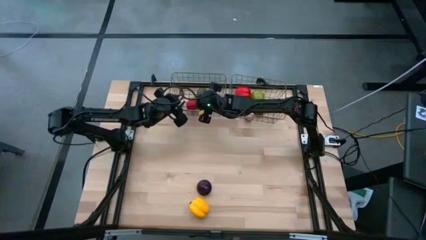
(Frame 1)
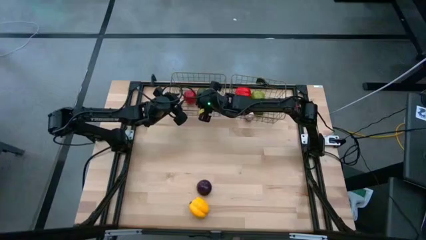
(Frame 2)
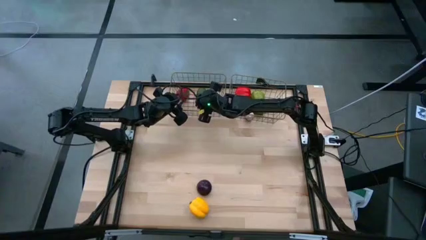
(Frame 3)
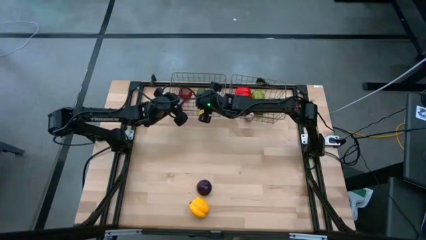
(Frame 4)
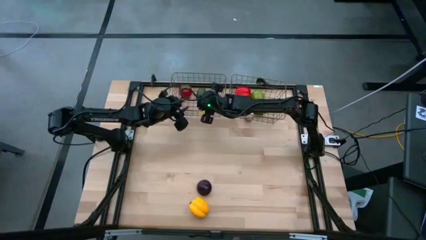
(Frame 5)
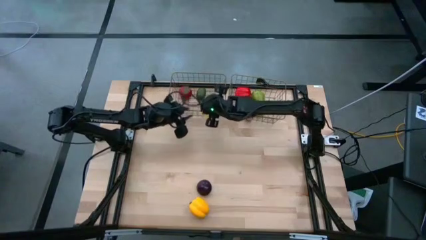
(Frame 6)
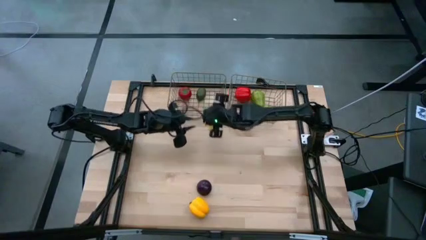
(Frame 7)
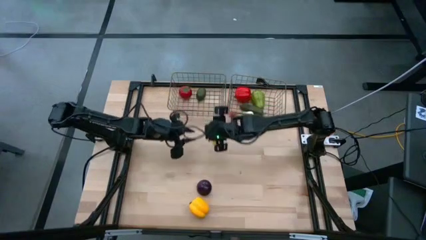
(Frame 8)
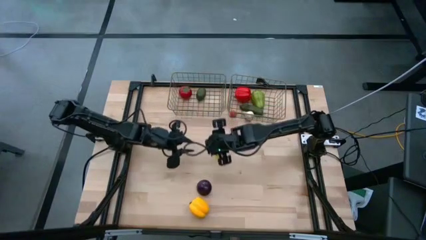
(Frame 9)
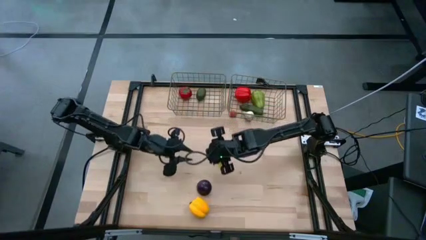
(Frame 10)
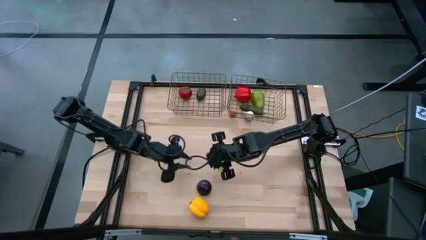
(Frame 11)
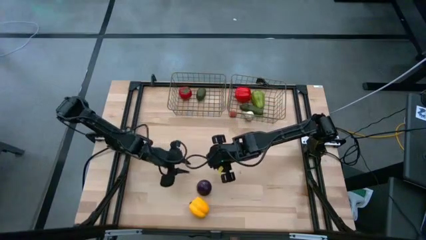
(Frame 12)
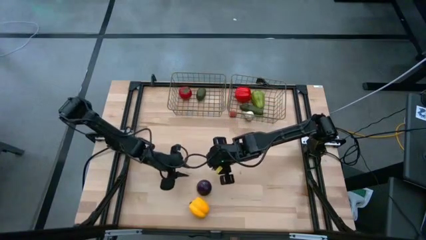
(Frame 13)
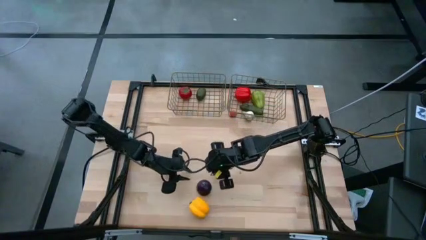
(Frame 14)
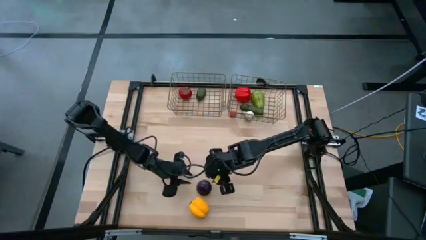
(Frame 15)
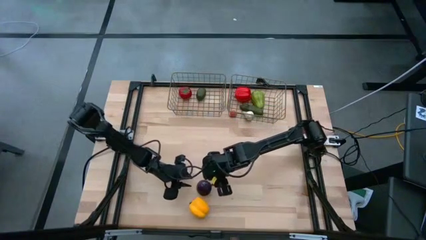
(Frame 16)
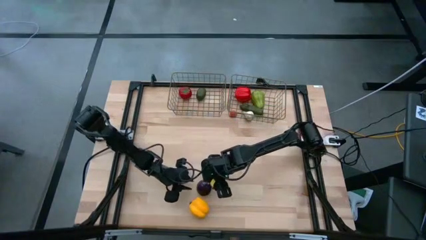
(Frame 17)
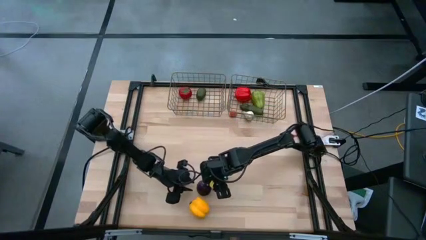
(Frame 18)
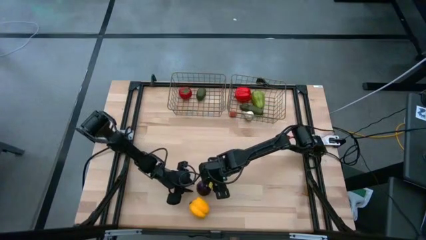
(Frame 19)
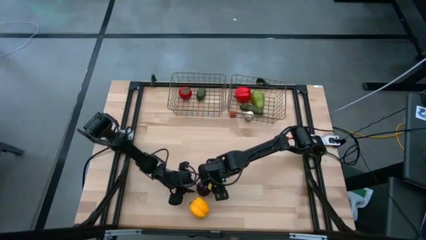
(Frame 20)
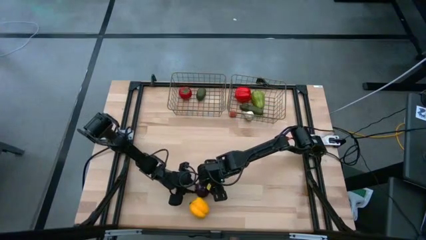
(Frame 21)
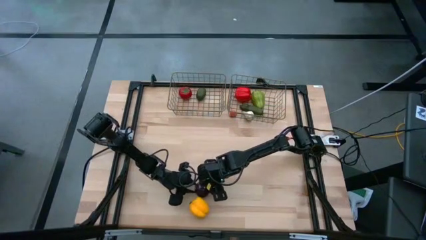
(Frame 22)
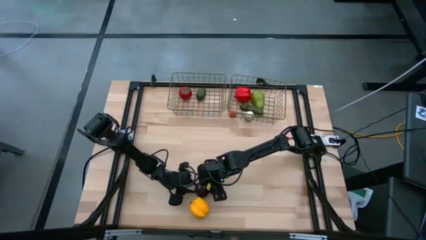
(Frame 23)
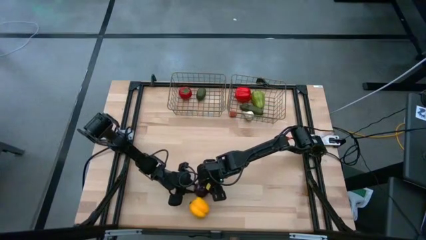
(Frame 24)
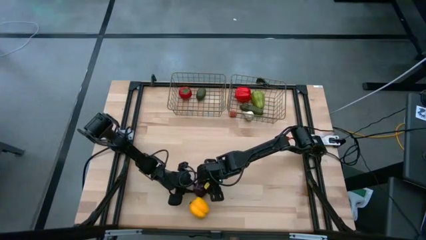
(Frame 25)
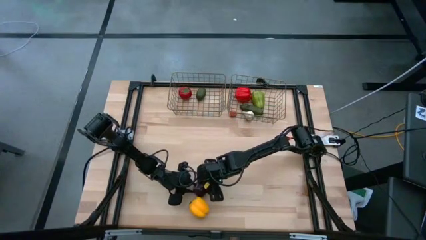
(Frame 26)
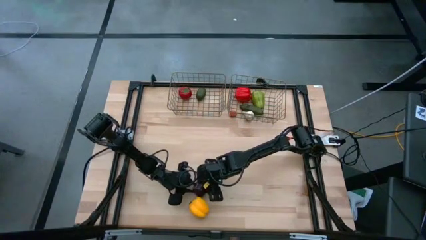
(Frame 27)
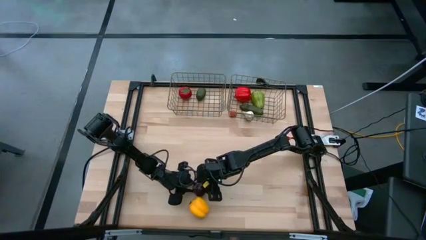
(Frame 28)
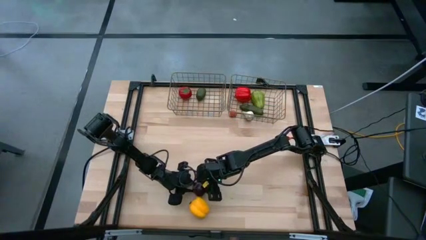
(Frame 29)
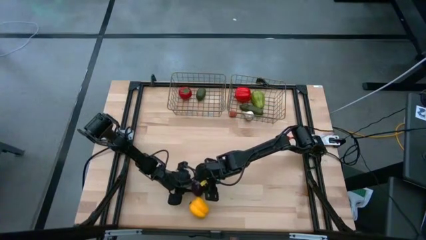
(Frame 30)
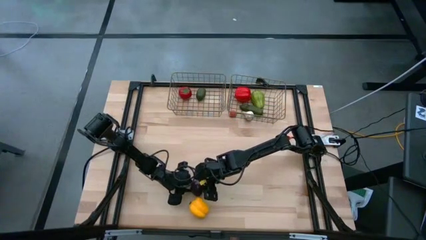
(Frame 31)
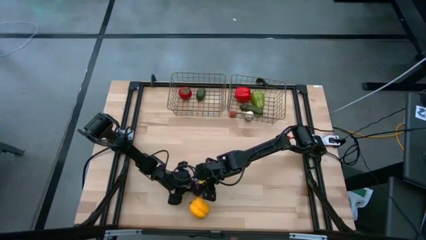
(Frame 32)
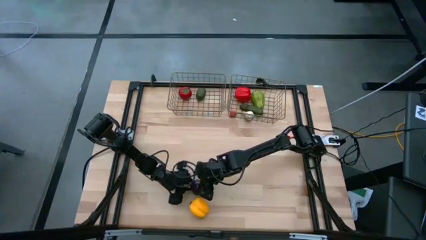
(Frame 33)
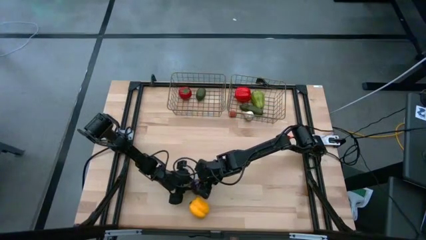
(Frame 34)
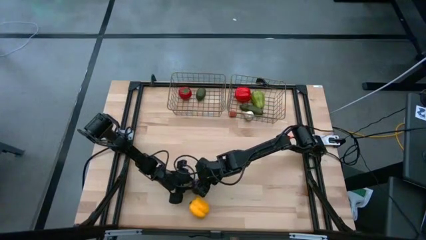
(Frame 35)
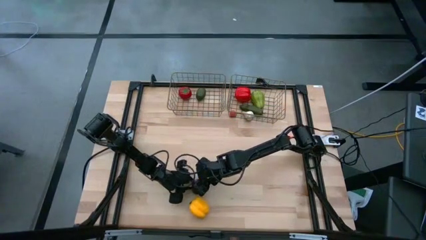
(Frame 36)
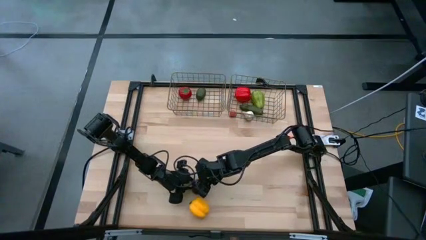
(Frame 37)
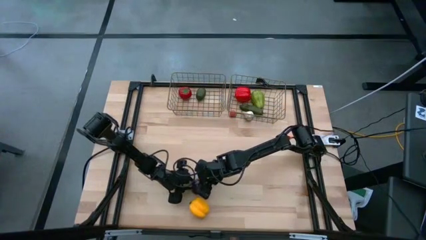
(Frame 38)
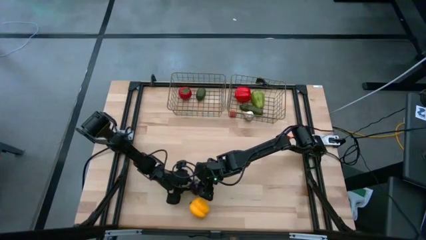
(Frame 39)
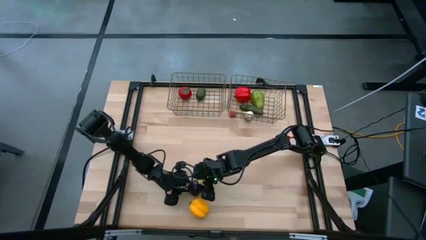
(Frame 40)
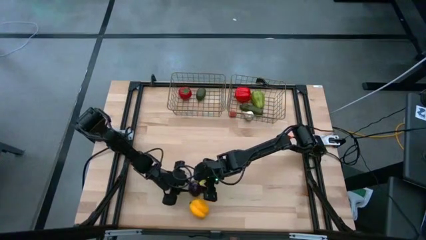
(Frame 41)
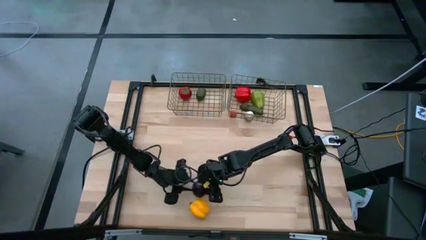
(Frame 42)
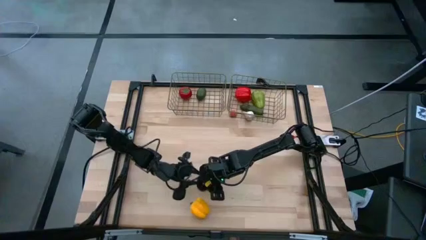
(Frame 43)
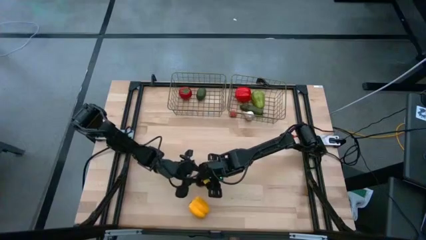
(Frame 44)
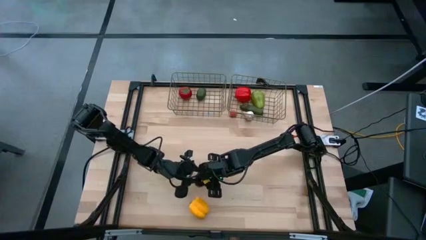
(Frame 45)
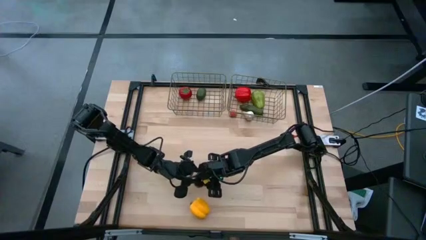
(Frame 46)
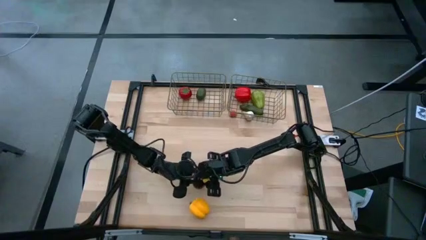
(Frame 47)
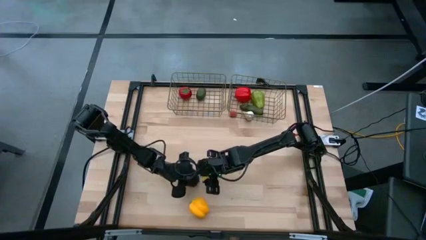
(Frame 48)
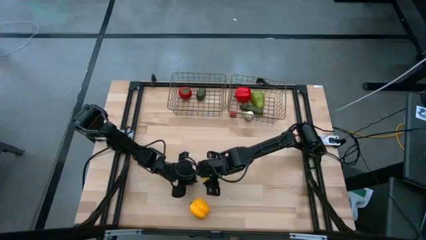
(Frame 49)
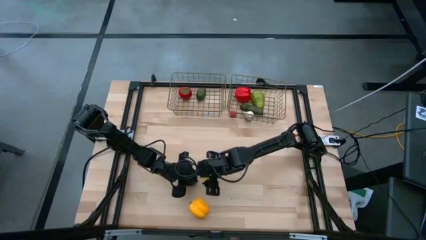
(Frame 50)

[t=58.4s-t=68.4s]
Task: Sort produce into baskets
Put the purple plum into the right gold wire basket

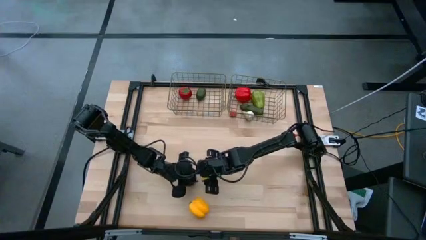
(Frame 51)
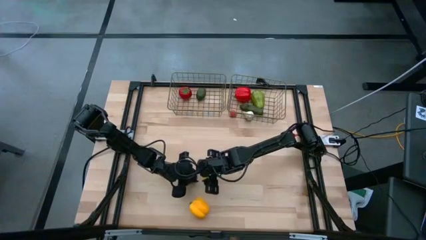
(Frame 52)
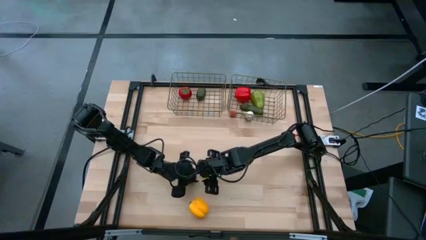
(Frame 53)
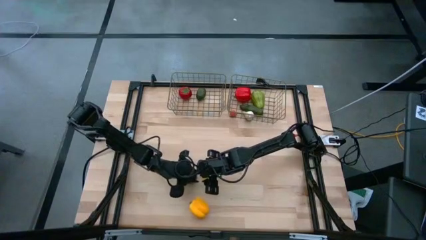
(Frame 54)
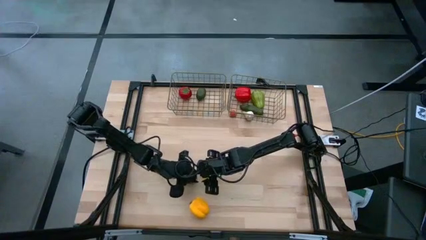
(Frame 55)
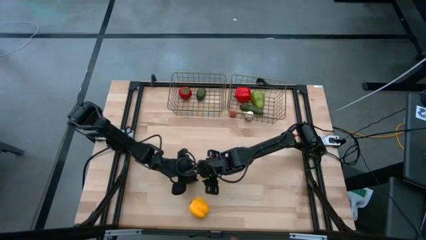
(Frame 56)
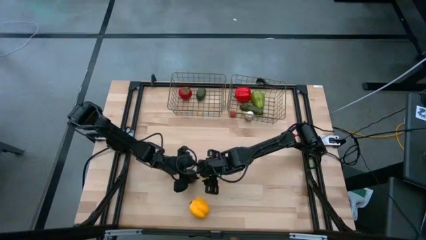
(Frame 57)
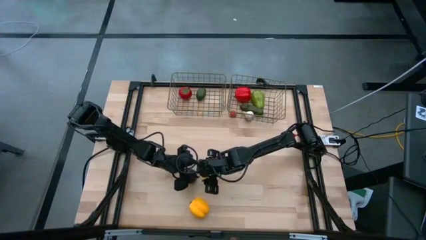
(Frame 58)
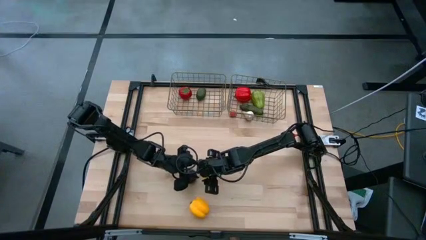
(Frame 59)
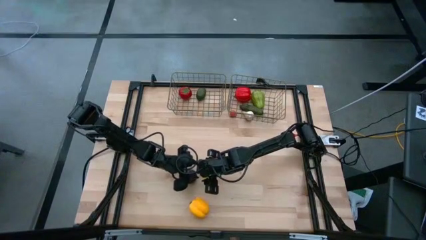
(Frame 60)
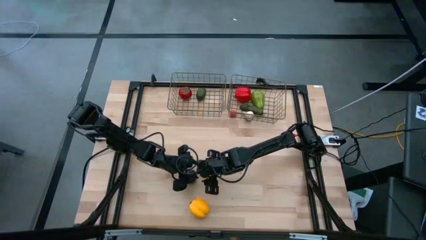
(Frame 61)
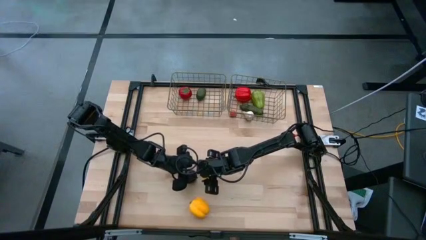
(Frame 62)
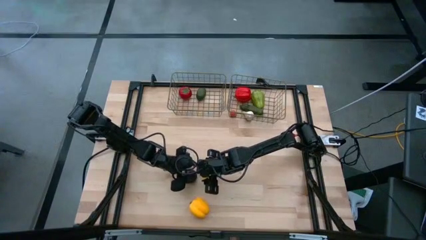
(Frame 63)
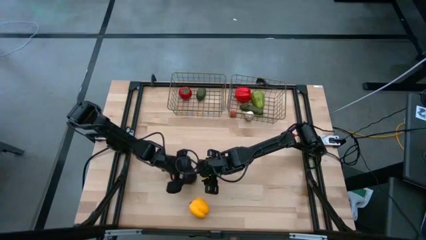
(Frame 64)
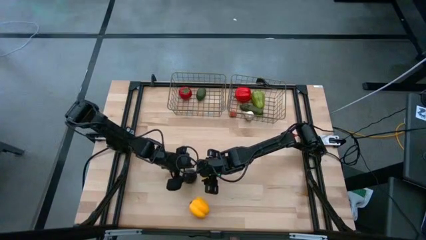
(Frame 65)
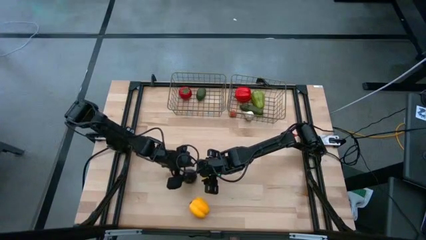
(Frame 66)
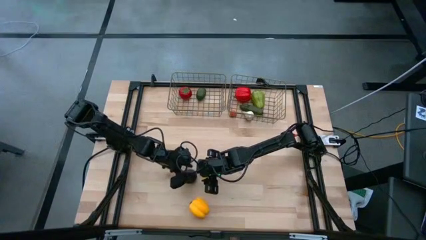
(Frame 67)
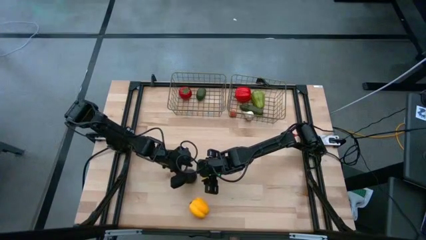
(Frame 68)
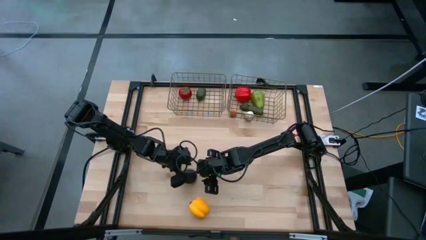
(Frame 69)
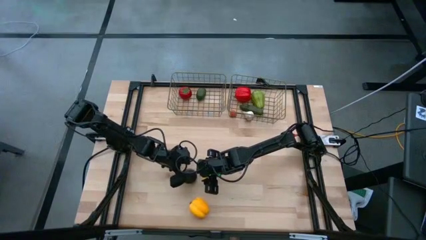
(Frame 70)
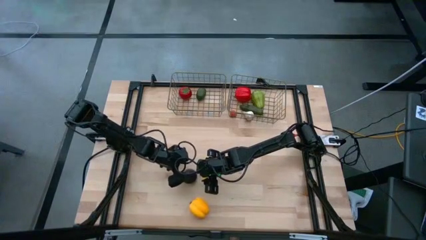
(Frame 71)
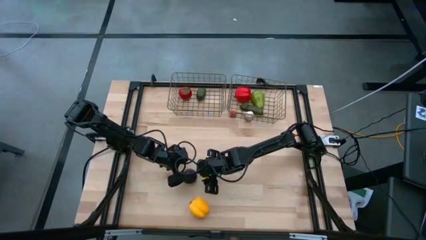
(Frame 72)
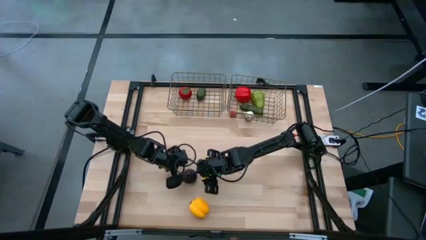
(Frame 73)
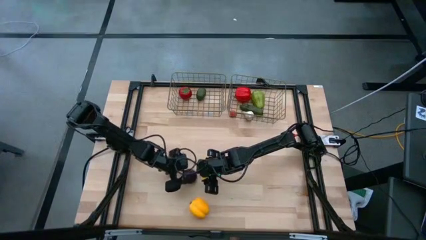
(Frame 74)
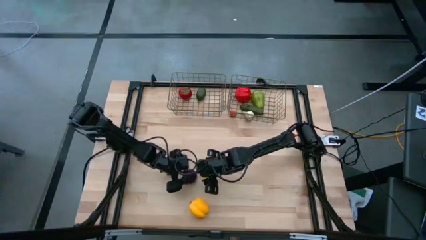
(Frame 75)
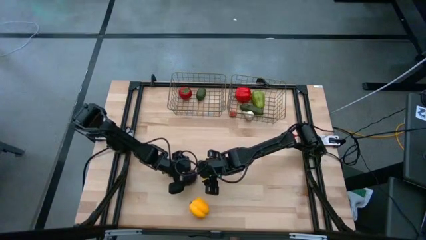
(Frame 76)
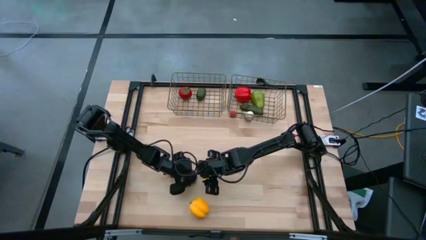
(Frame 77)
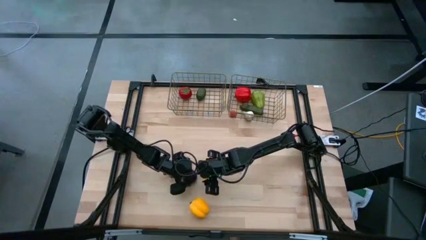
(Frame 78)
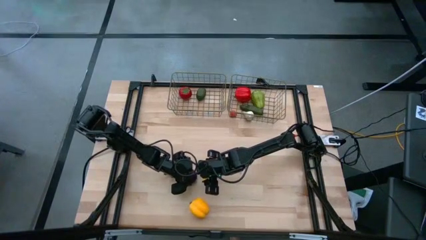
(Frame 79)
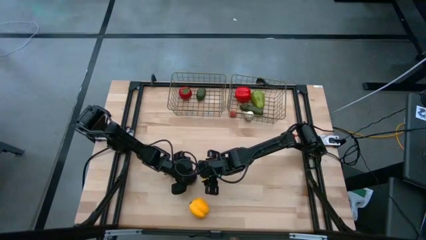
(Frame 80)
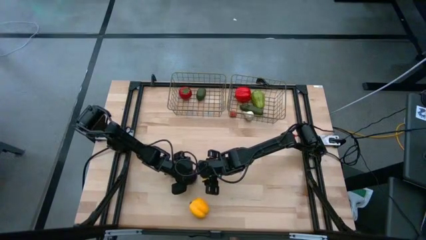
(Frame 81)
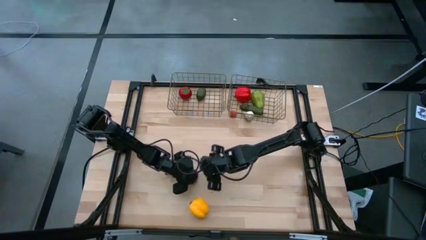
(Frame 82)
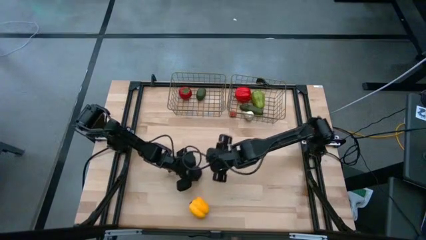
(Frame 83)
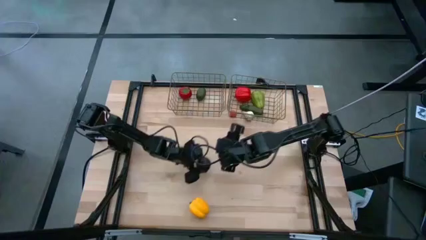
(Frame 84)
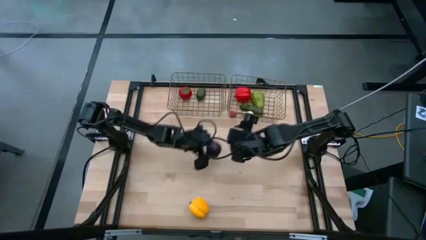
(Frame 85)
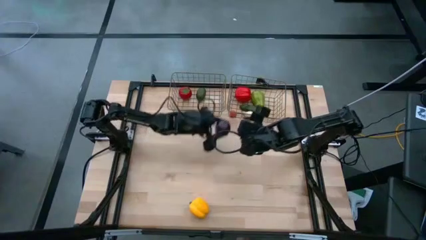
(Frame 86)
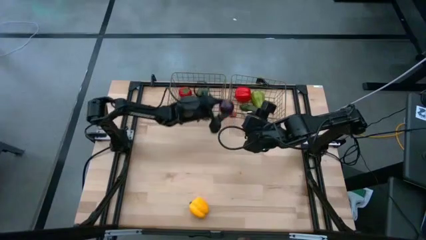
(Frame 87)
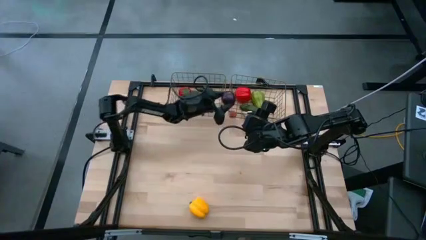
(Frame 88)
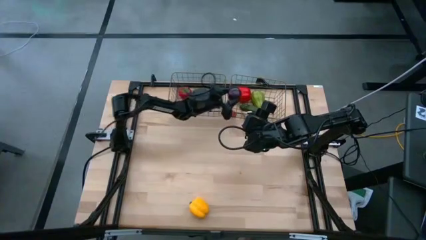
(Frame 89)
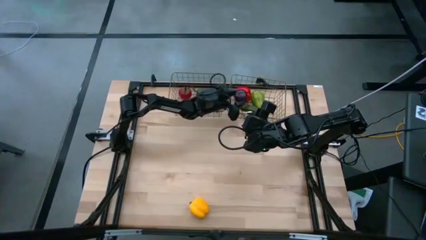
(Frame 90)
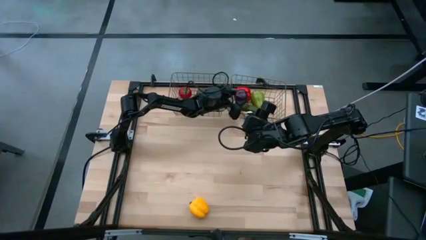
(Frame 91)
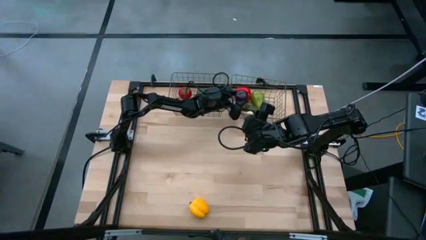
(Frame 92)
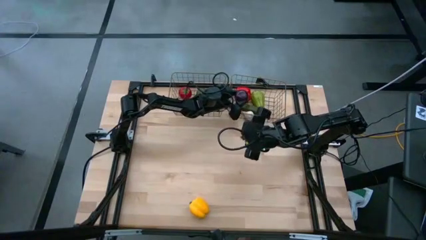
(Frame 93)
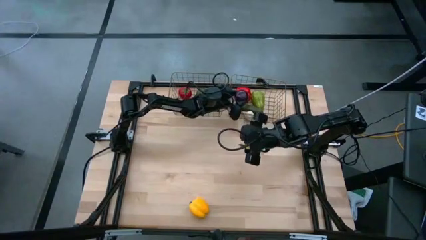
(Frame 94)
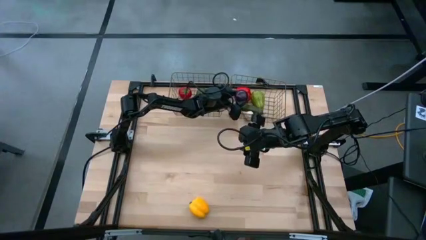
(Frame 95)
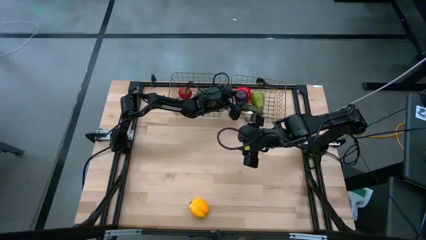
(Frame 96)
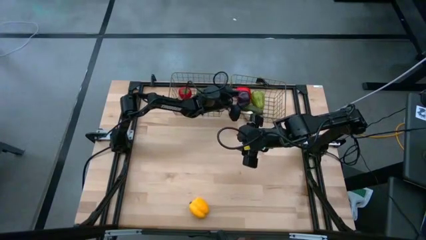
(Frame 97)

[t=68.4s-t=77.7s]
Put the purple plum into the right gold wire basket
